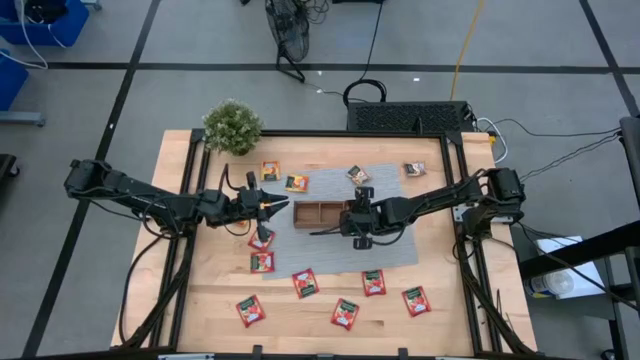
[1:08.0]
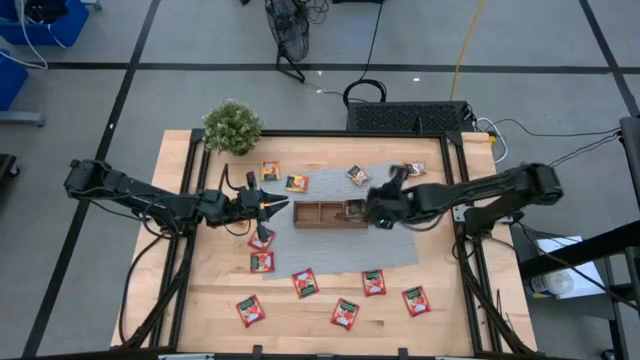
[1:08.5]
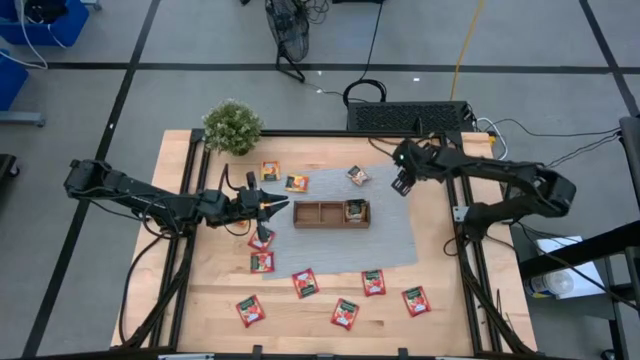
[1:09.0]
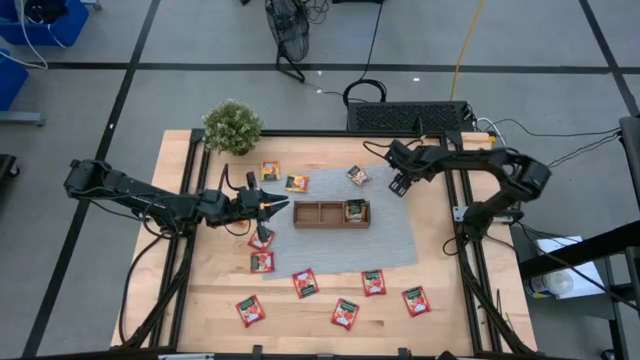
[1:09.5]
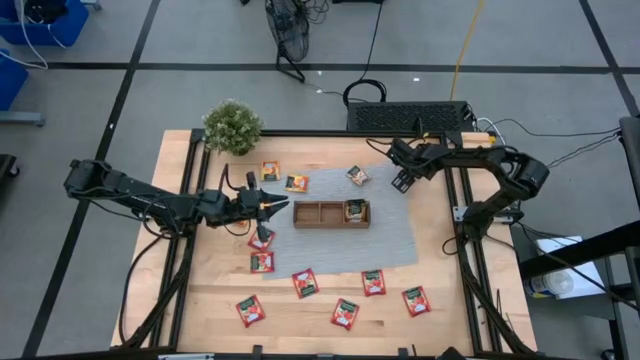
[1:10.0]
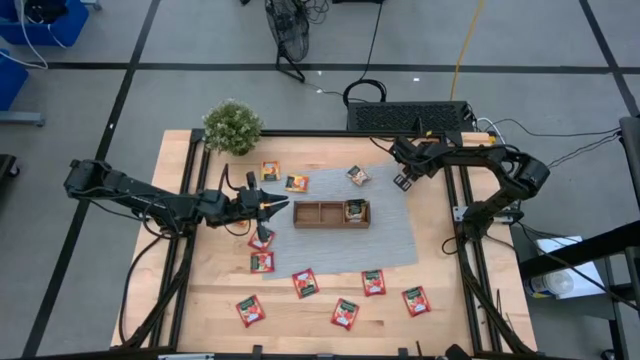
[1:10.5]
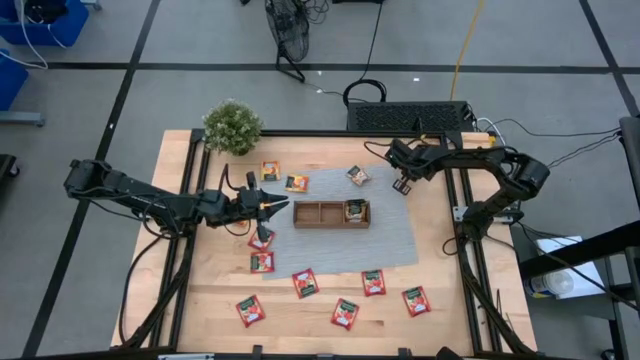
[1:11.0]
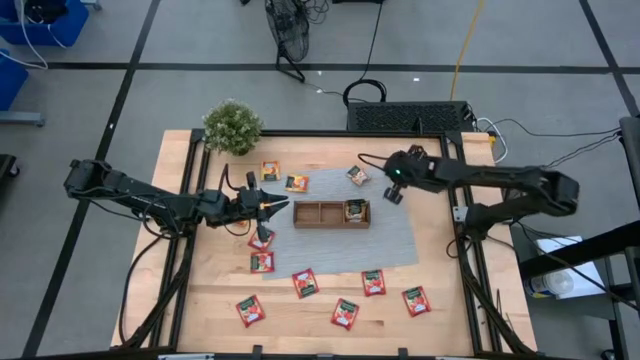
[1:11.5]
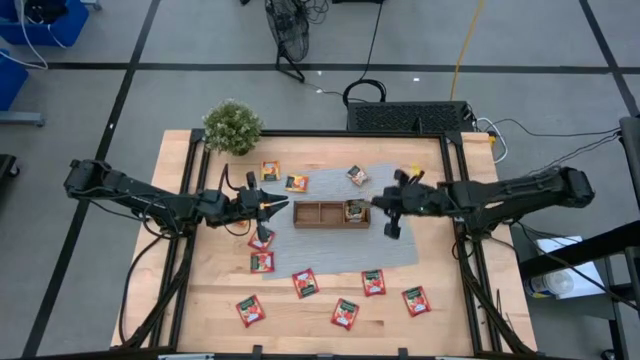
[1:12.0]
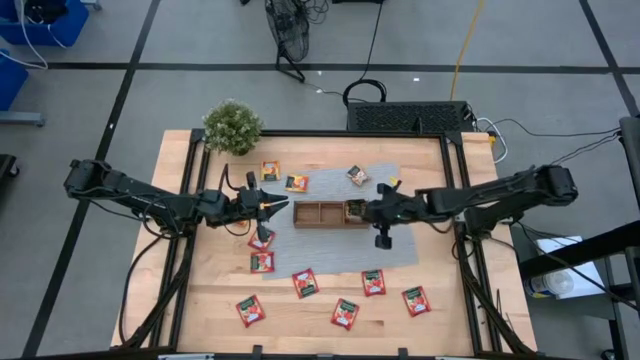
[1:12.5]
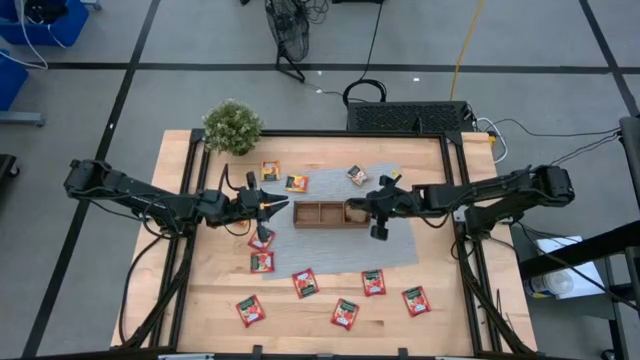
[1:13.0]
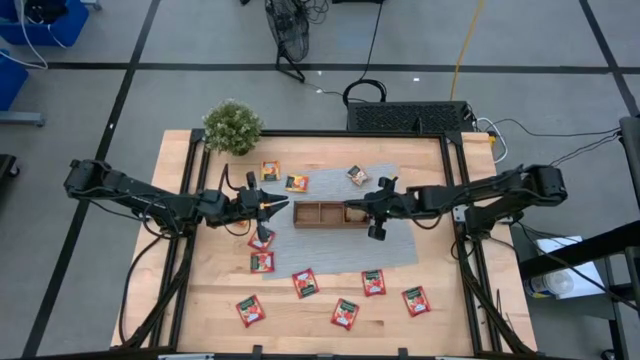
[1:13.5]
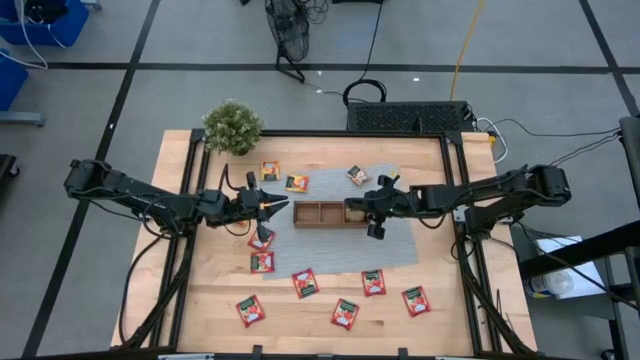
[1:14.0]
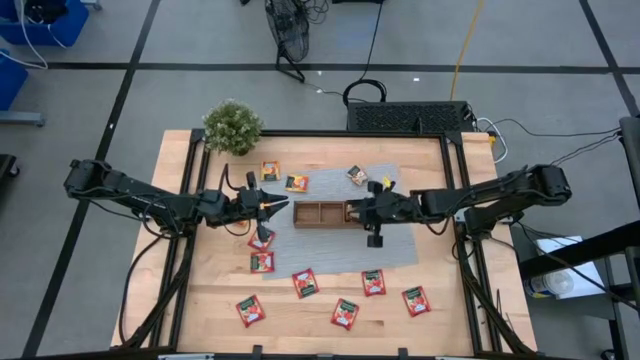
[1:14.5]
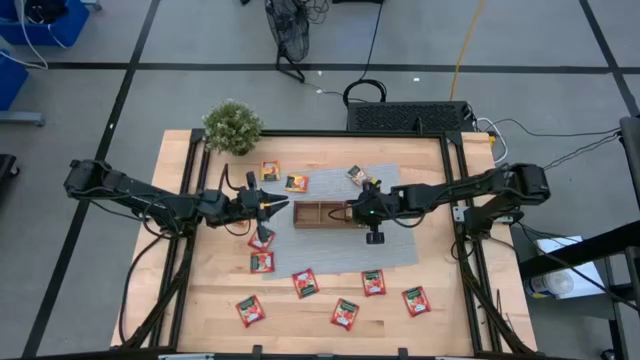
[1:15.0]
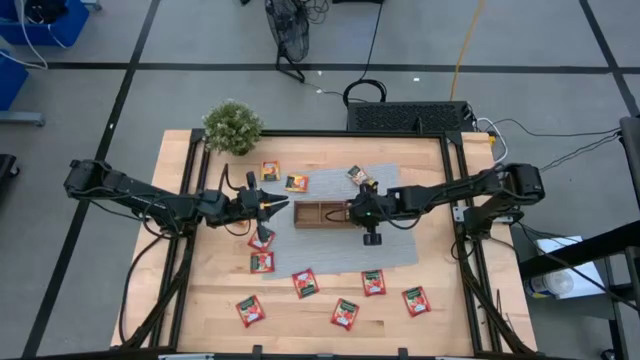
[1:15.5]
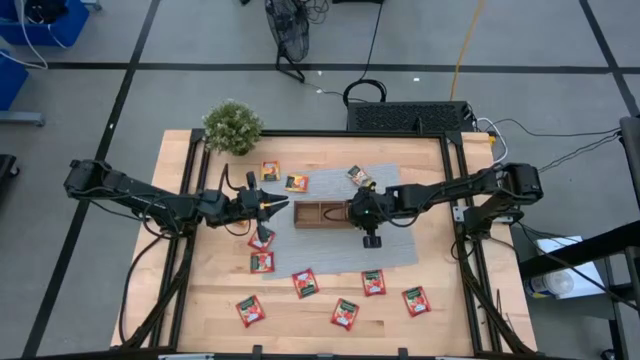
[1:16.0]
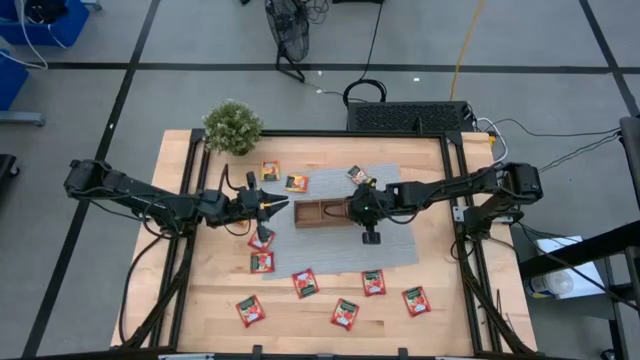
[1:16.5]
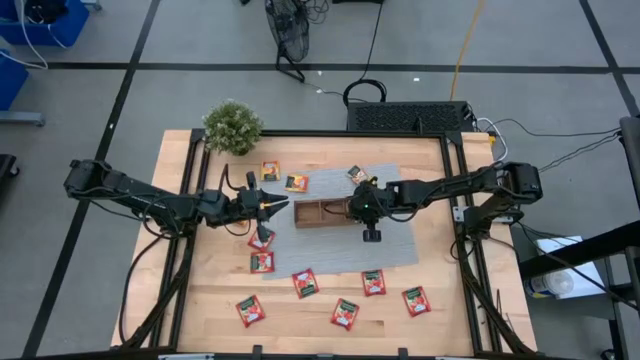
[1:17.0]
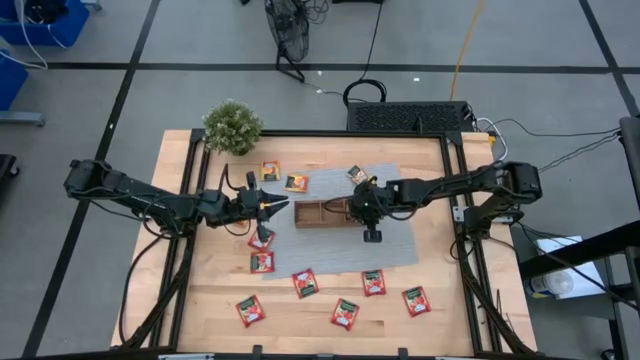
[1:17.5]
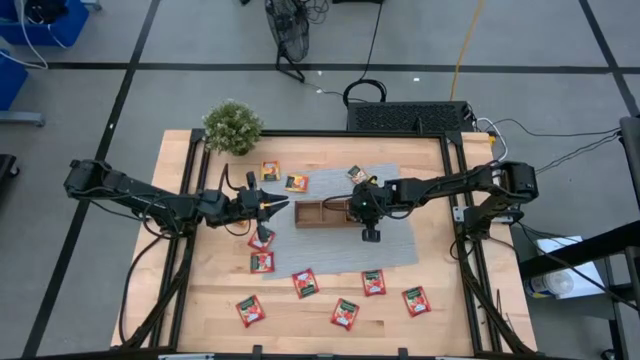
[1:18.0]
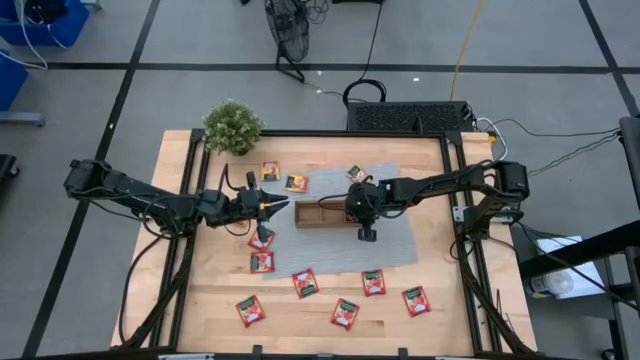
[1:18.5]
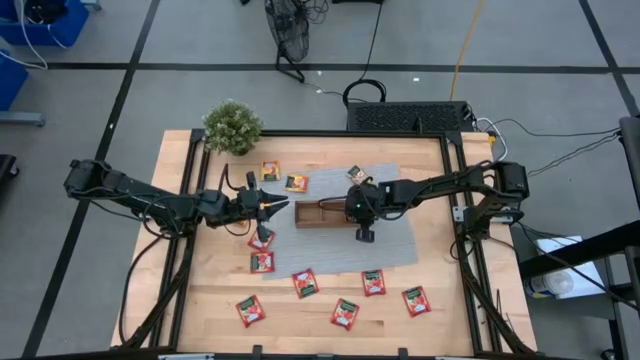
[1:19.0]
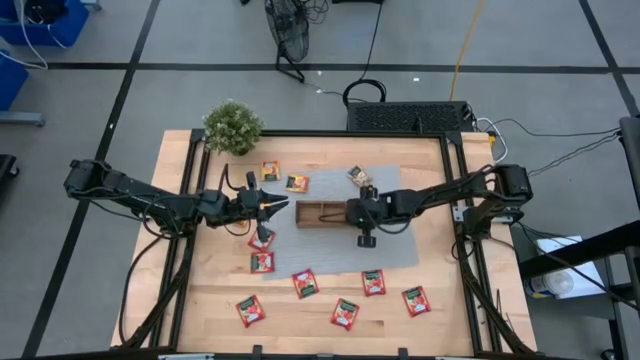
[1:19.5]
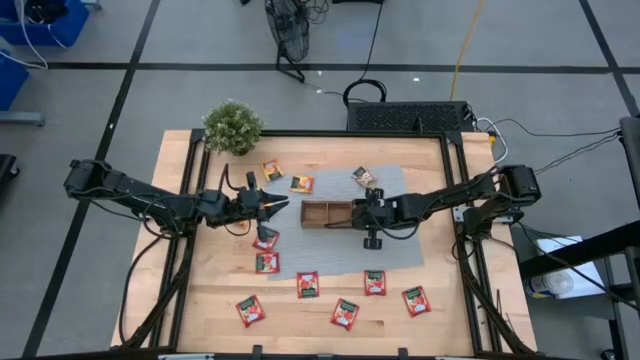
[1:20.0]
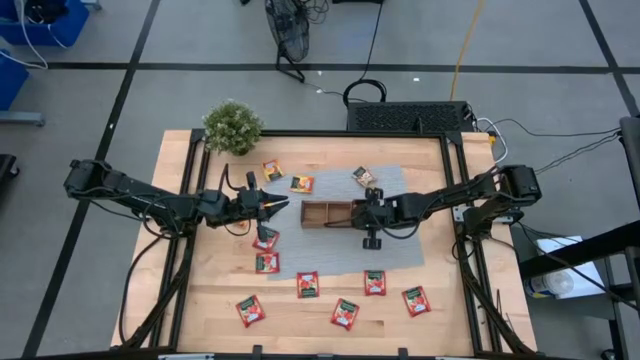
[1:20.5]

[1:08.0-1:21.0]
Task: Pick & Place Tea
Put the brown tea bag into the right section of the wooden organizer

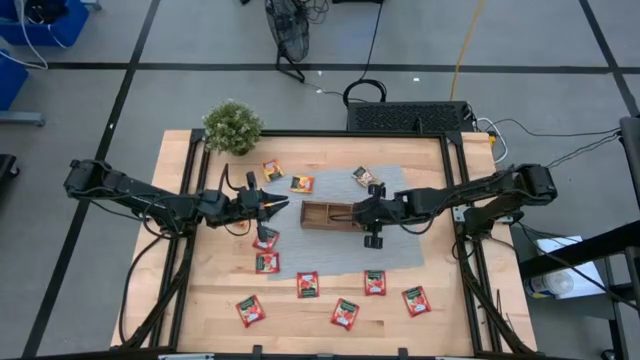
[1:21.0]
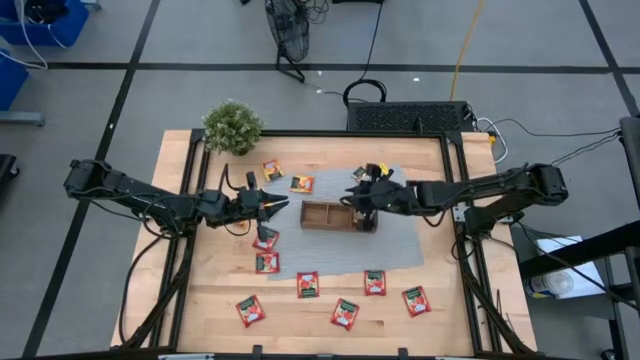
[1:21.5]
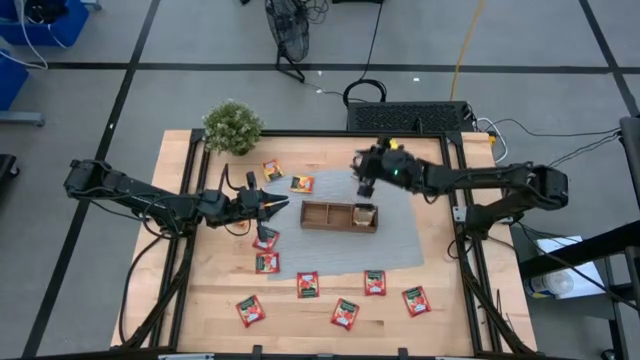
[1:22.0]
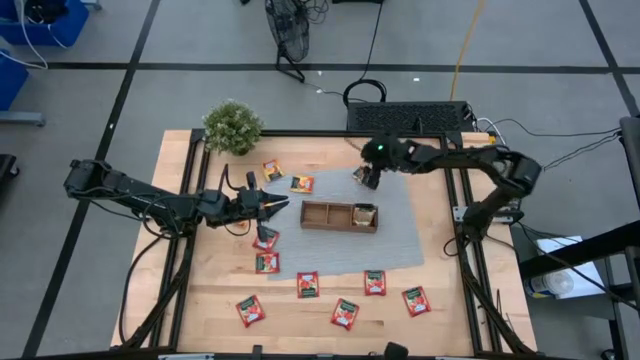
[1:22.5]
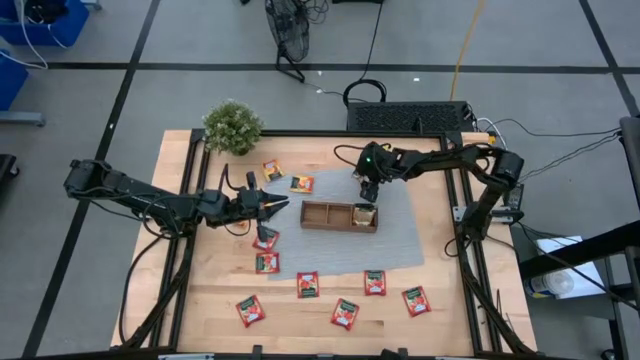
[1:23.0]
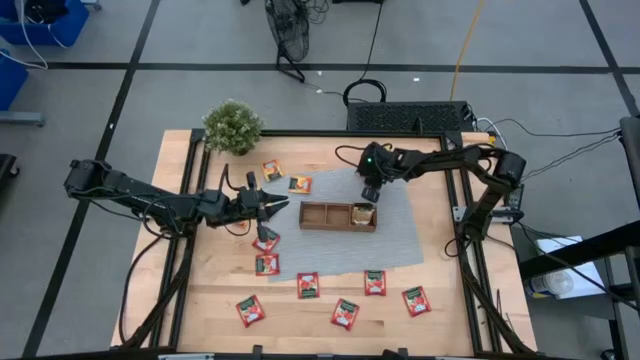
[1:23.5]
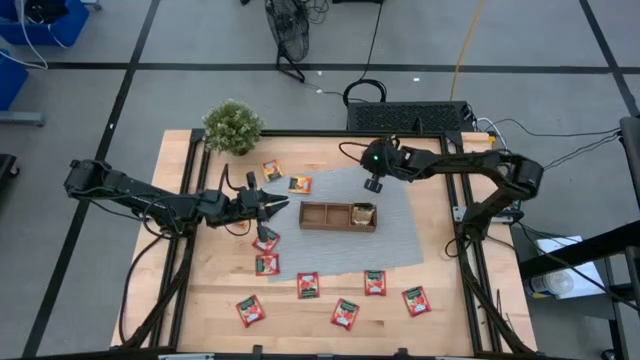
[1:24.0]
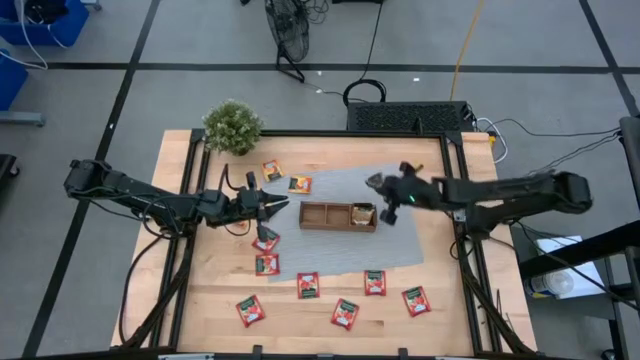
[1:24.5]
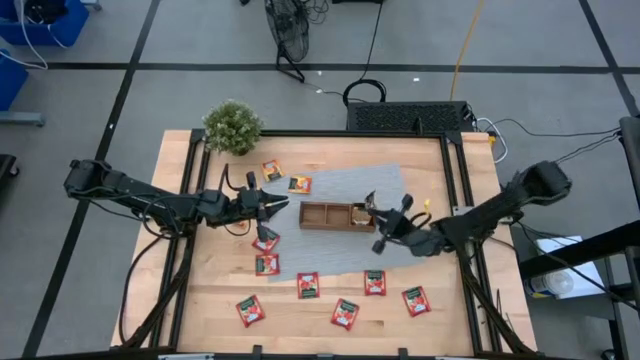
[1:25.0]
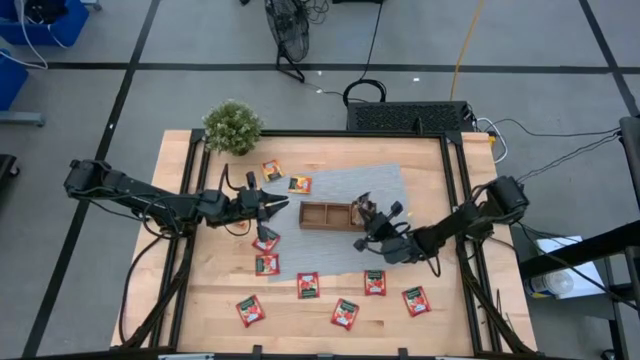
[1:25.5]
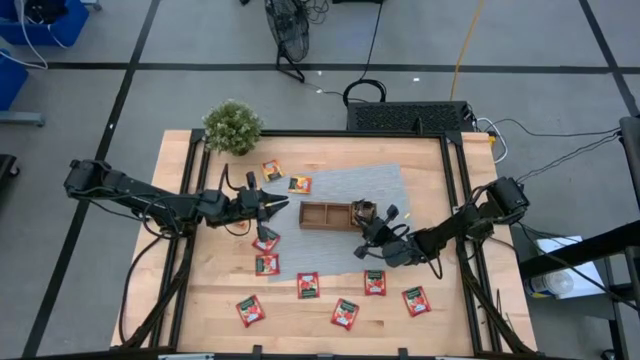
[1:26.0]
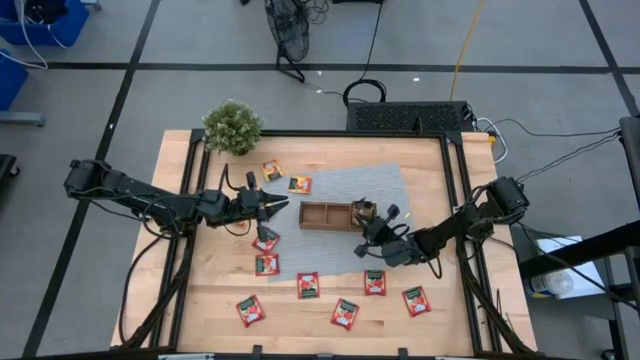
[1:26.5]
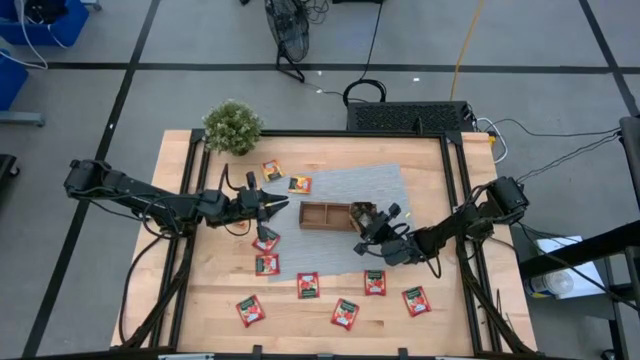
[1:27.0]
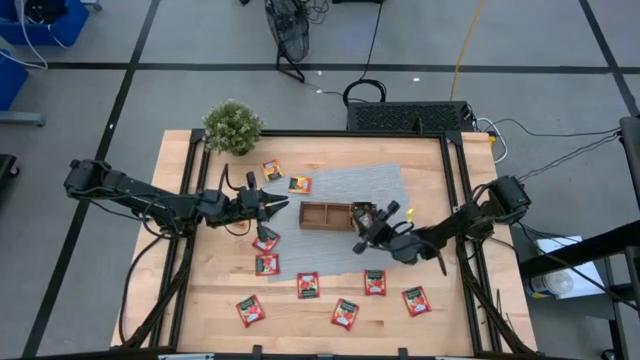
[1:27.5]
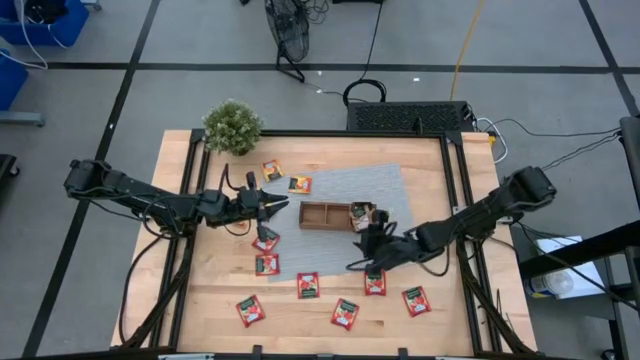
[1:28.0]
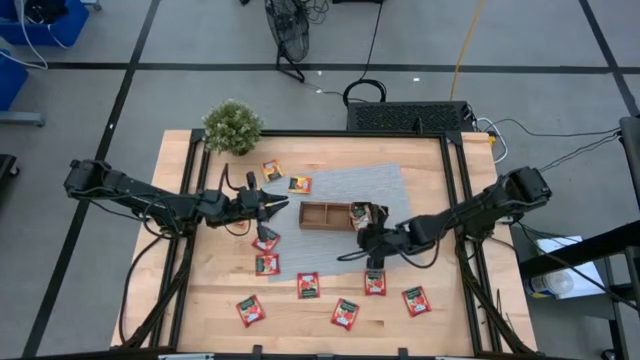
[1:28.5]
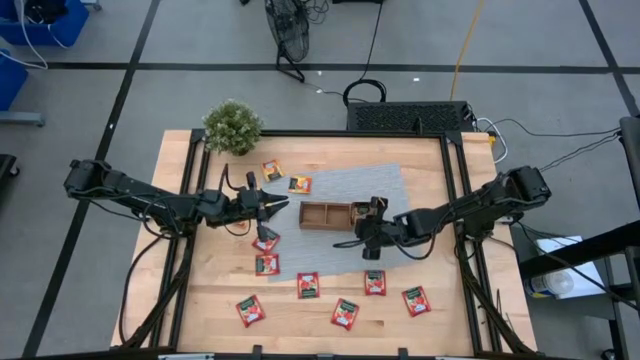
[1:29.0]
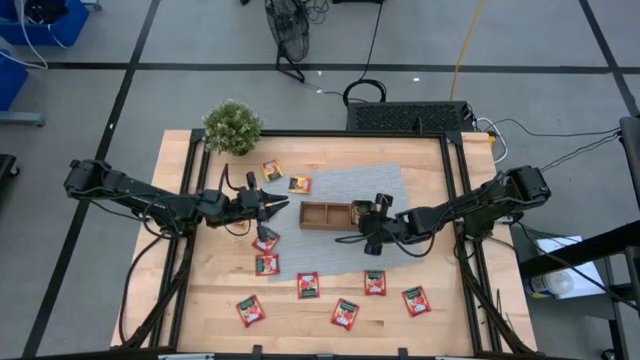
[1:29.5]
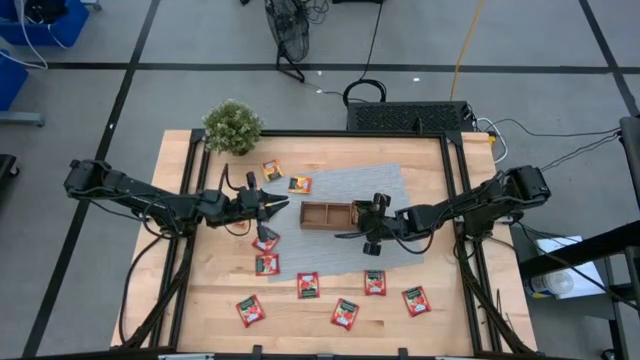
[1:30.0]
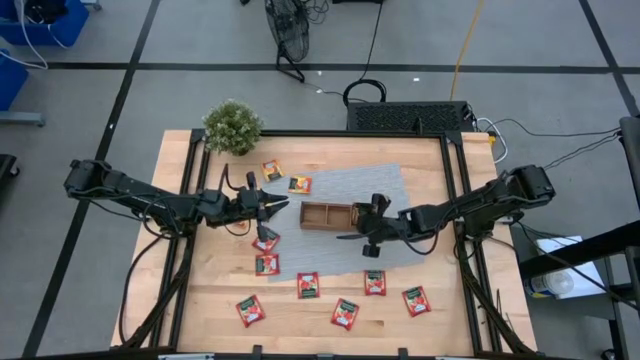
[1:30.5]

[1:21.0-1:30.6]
Put the brown tea bag into the right section of the wooden organizer

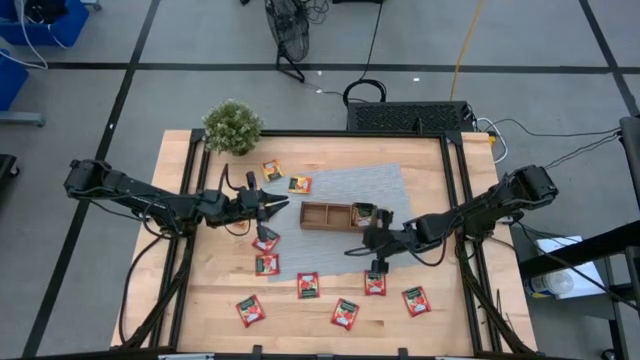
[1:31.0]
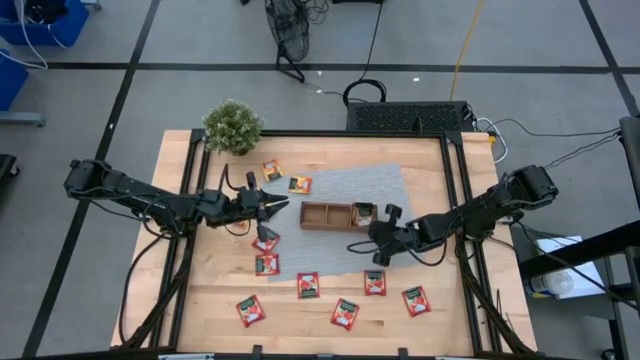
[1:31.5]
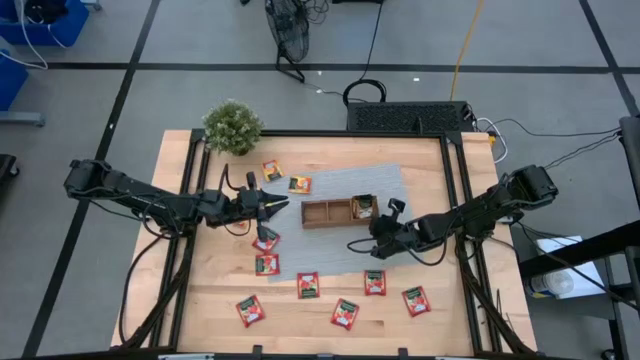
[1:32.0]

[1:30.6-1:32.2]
Adjust the wooden organizer
